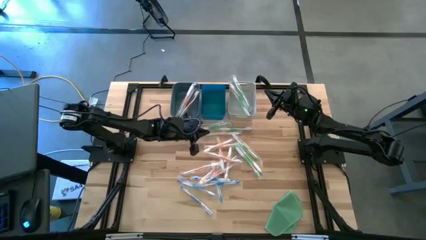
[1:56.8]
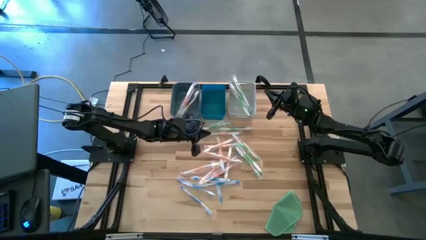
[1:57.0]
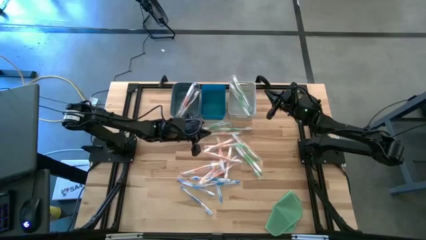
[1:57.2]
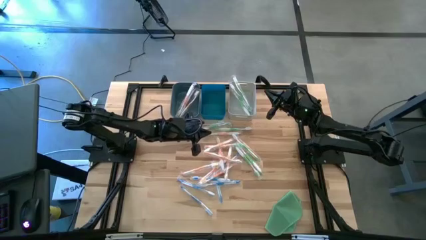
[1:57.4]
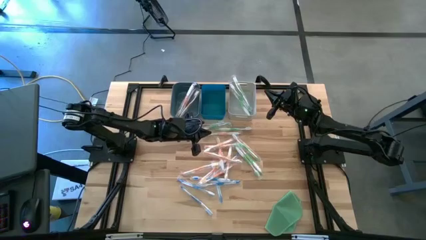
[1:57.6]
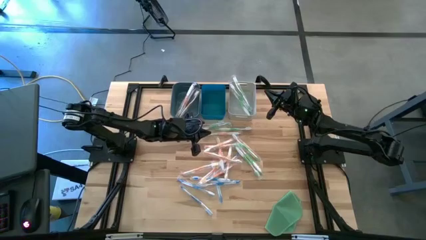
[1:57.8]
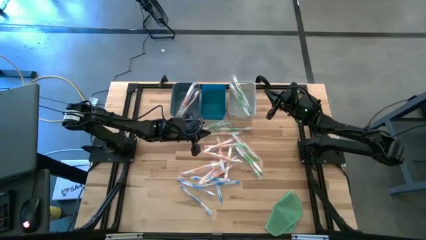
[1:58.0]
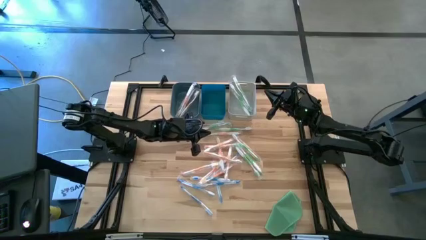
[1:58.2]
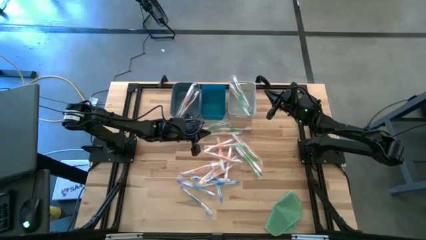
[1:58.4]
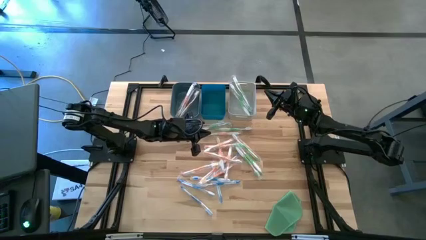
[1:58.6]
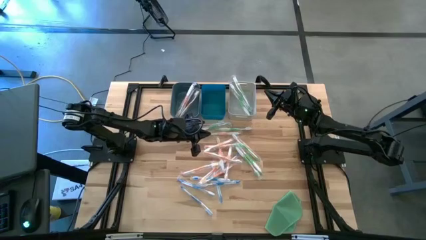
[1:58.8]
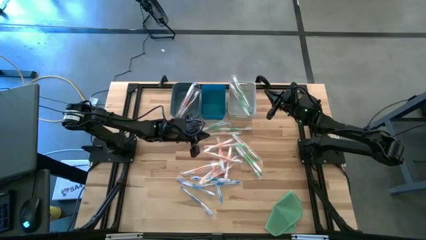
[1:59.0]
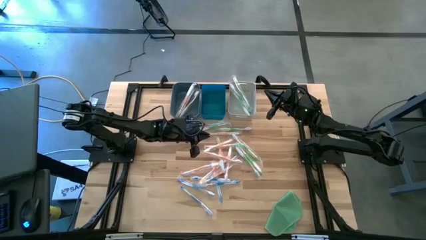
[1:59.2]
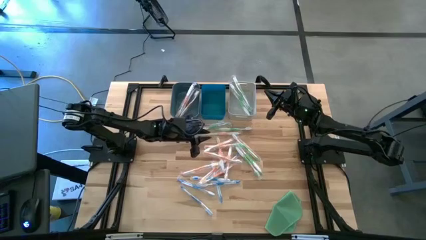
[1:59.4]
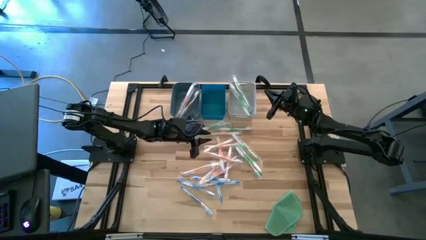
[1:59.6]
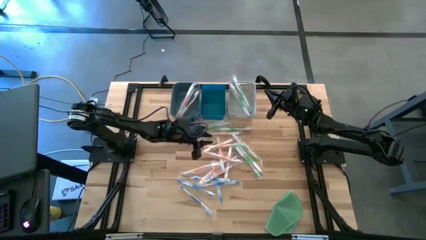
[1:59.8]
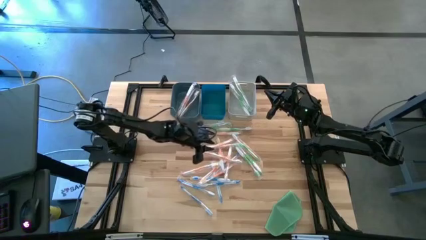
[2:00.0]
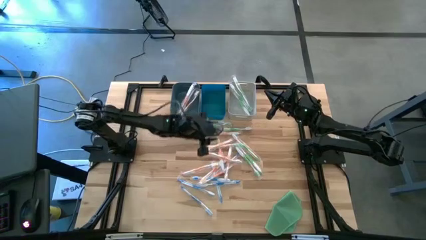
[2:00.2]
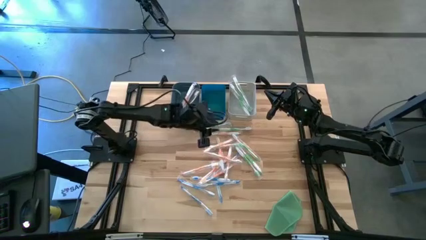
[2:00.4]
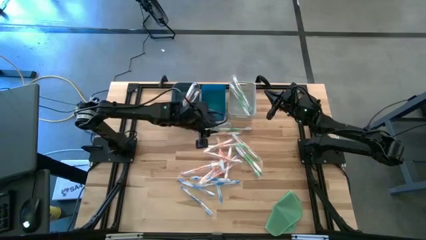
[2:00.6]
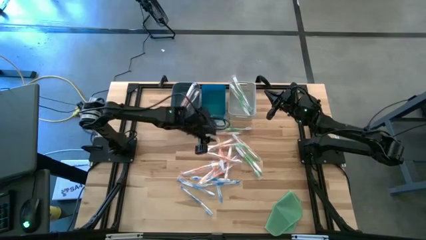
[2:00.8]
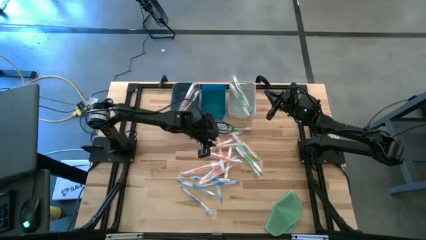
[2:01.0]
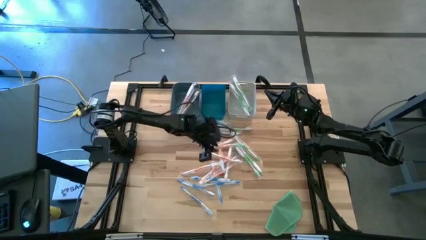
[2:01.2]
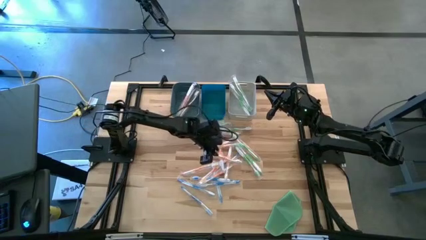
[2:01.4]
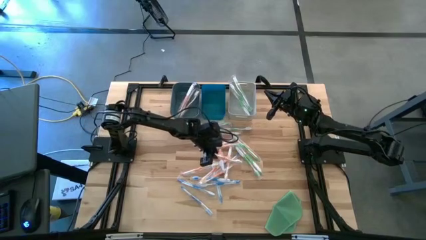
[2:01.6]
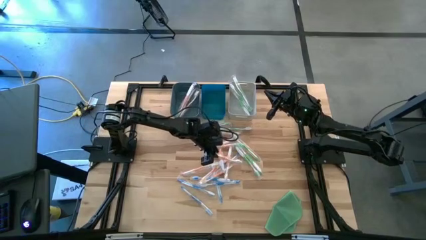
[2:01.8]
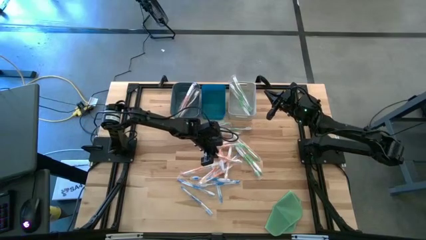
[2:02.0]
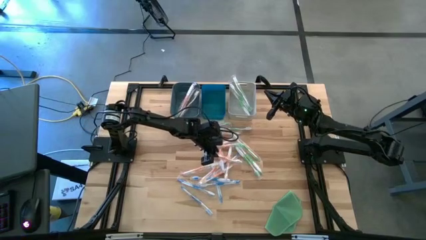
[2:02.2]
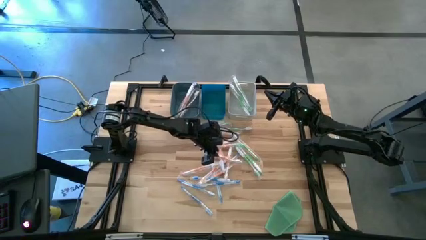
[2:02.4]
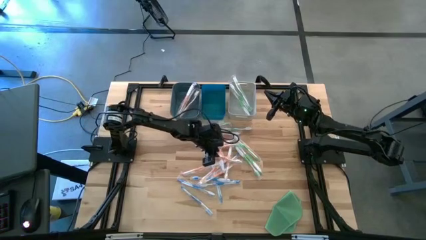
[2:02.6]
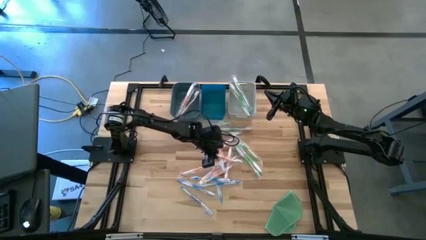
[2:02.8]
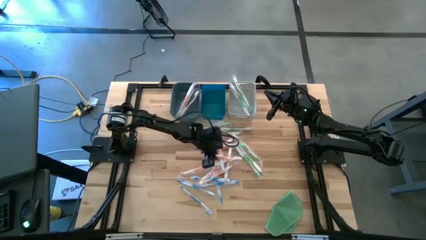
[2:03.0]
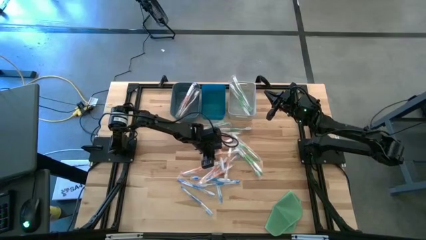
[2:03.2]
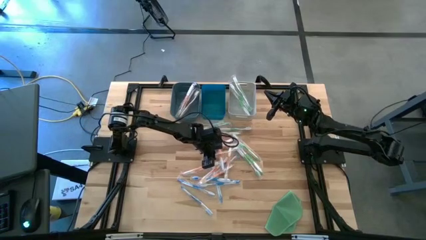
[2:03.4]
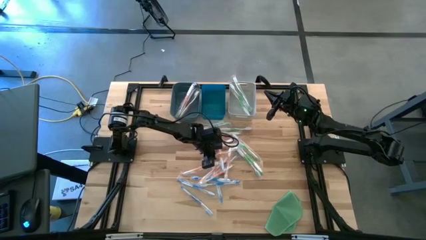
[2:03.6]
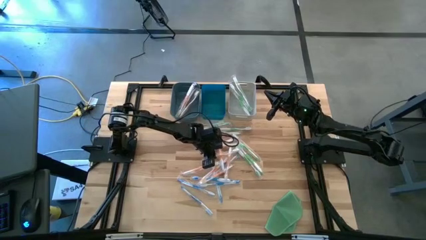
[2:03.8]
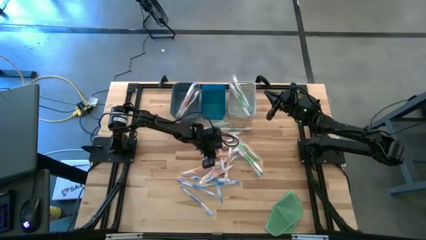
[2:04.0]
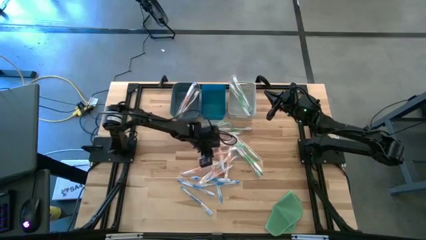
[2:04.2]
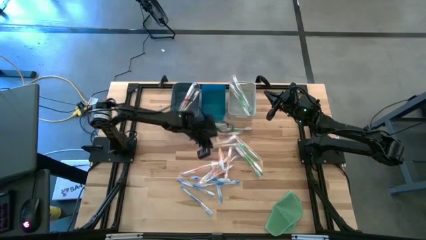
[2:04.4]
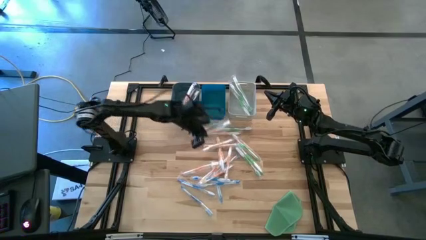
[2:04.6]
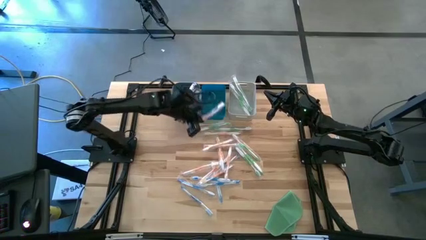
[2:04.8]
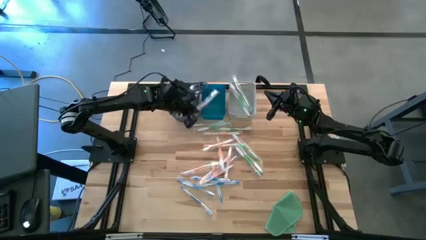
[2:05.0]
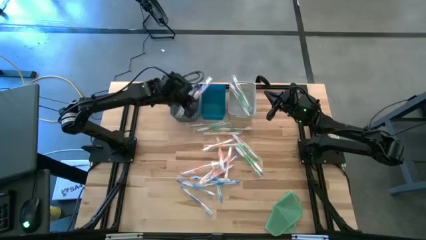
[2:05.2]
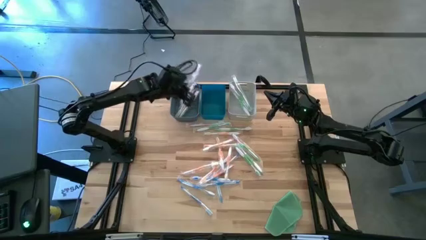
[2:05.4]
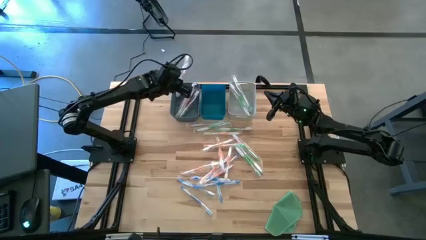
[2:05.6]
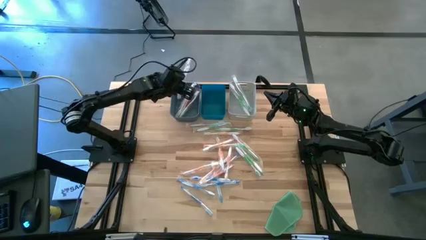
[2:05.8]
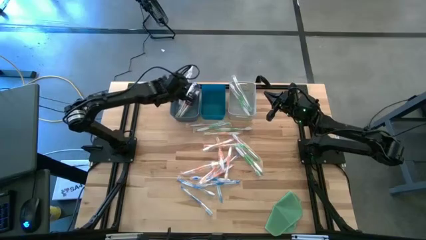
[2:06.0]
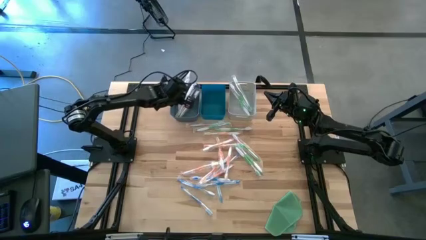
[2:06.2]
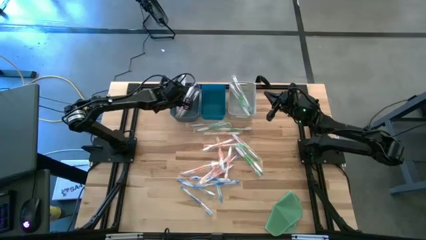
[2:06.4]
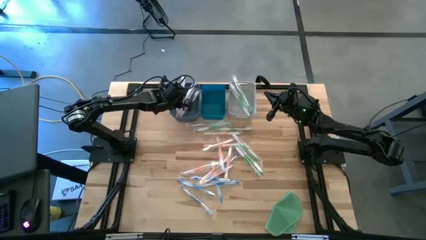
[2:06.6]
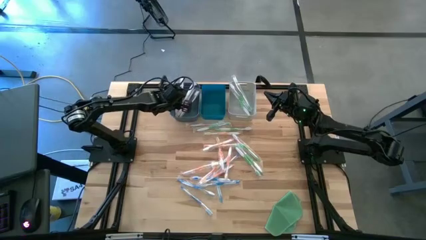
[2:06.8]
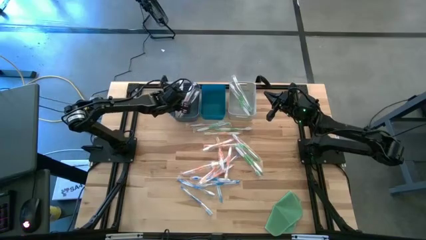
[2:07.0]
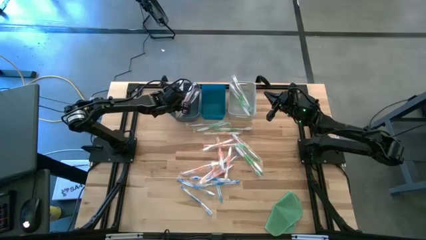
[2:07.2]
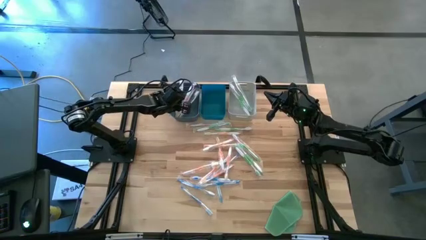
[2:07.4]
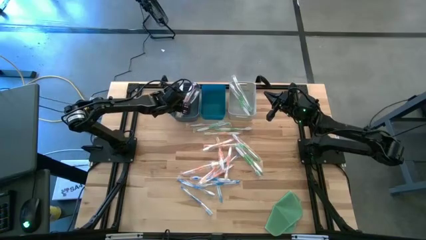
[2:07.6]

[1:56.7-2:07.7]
Task: Pick & Place Toothbrushes
Put the orange toothbrush into the dark blue bin

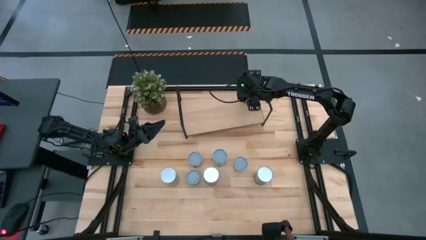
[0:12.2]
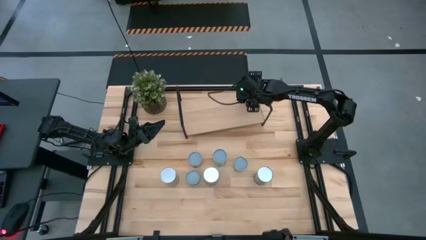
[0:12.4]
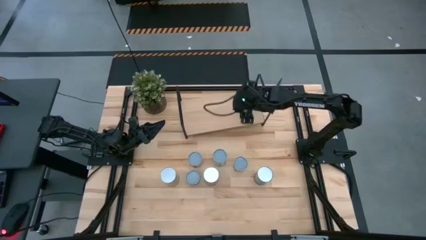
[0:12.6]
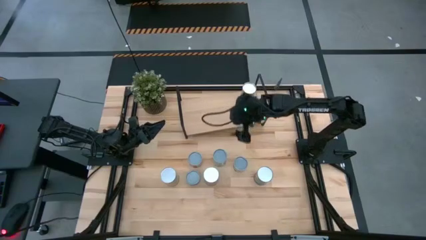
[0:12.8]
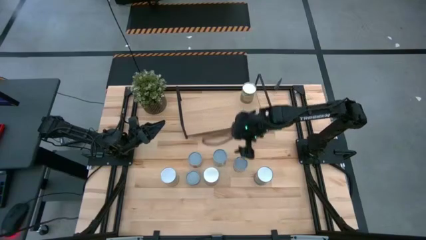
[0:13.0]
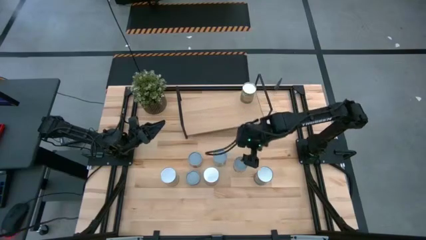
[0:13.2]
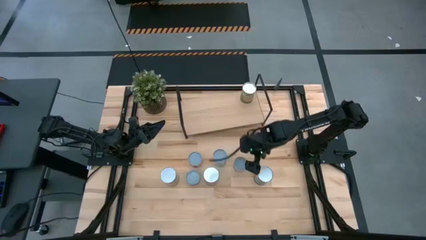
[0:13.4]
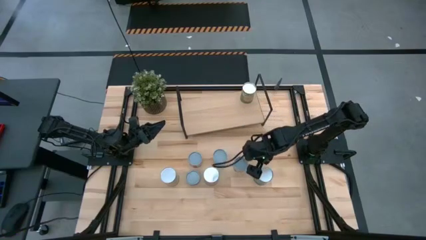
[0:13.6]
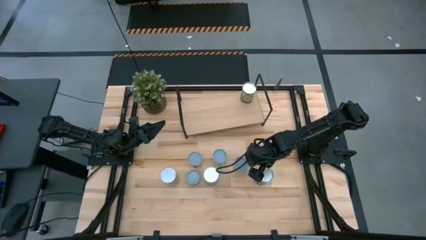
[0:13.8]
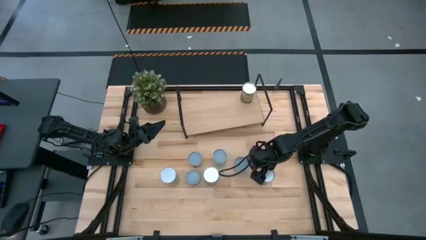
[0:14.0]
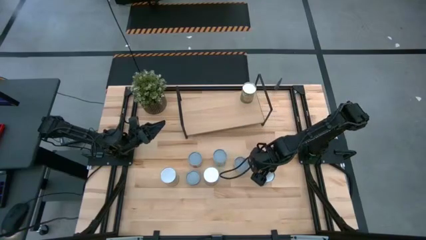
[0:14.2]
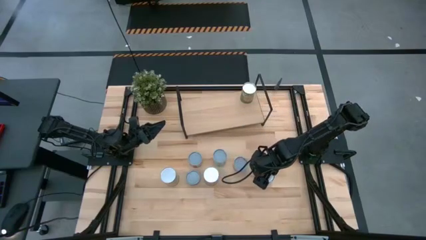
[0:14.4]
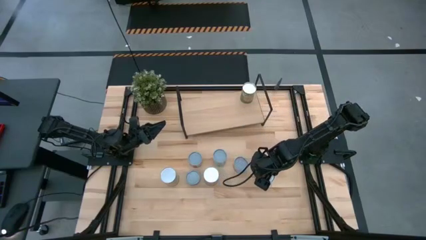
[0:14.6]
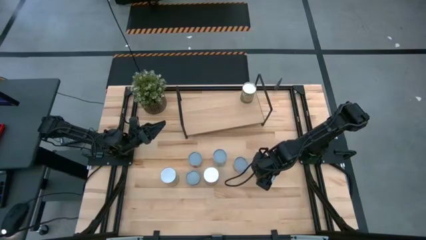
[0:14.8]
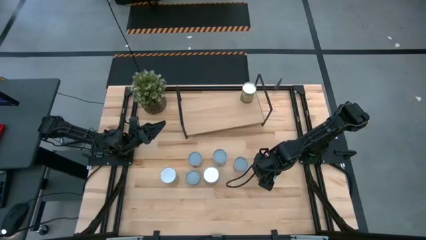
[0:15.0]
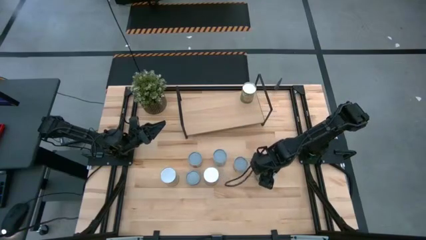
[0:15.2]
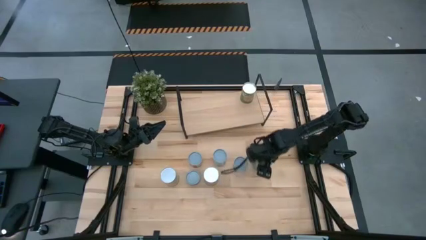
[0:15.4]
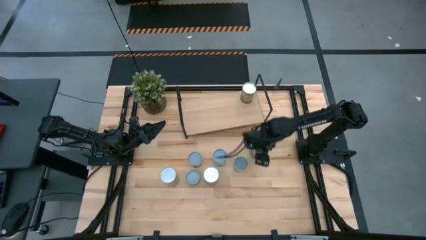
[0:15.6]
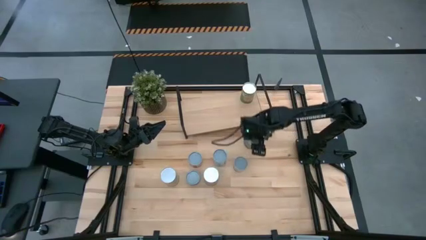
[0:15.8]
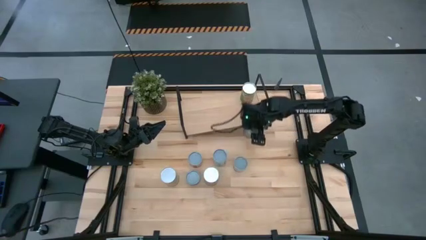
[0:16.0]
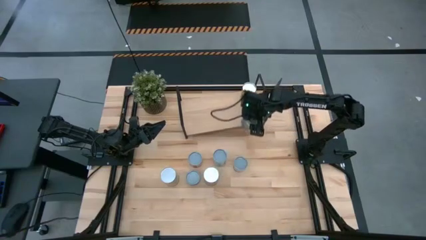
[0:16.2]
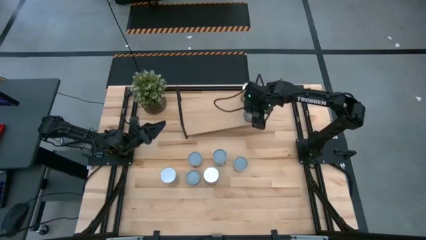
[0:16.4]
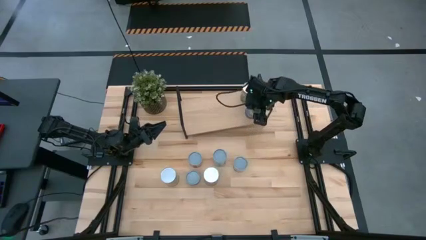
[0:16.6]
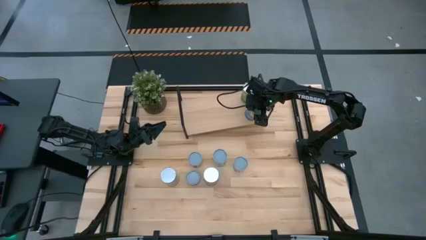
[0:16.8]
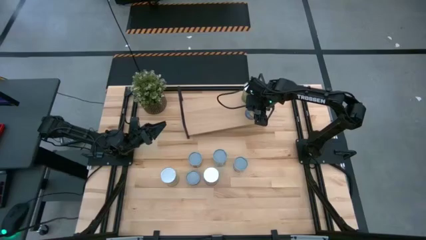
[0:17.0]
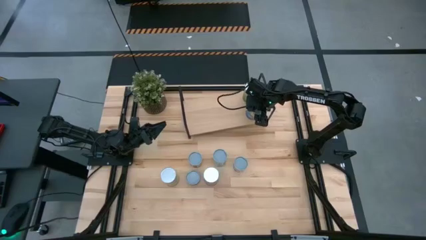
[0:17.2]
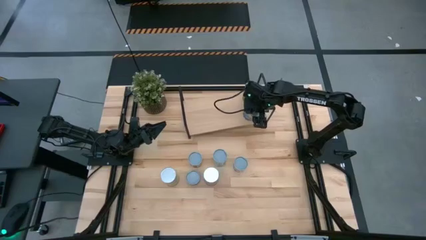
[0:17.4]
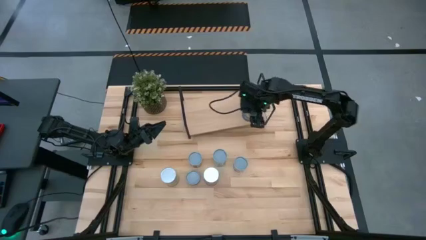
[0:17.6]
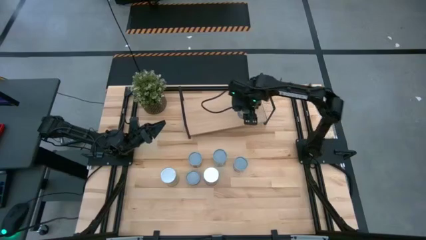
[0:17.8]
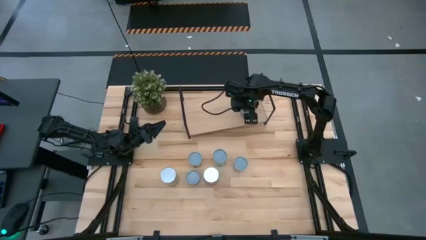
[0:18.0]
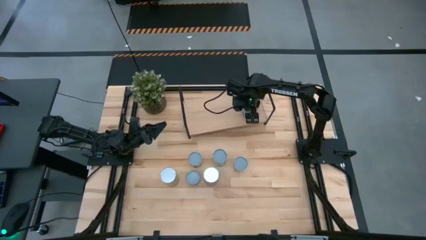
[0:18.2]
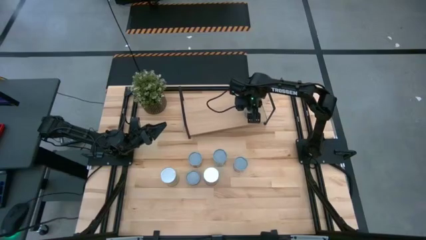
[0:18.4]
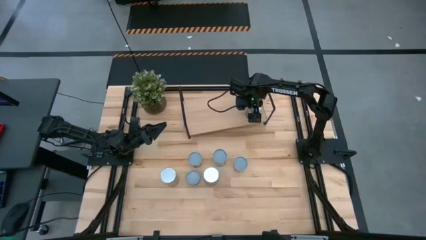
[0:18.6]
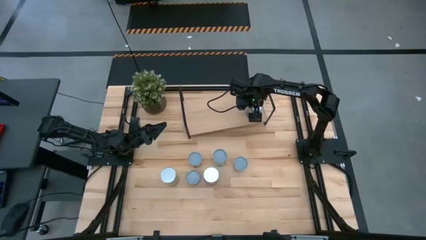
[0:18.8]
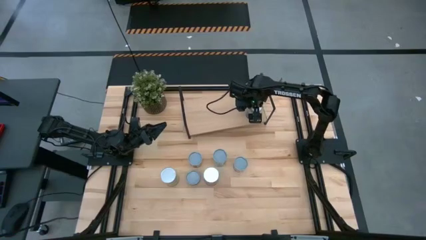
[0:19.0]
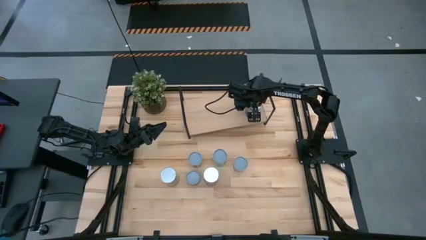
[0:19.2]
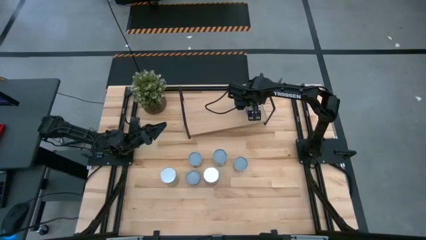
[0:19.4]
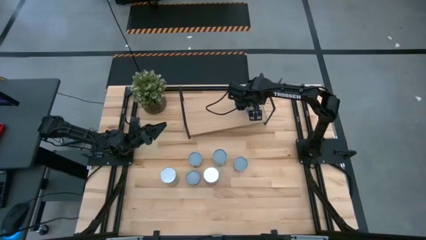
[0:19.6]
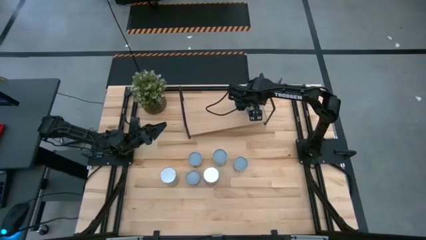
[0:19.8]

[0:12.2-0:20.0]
Task: Pick and place cans onto a shelf
Put the canned peas can on the shelf
